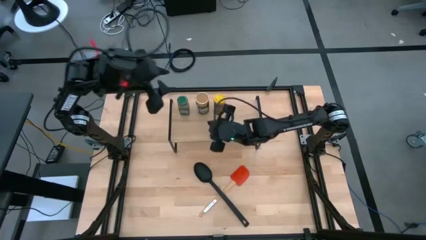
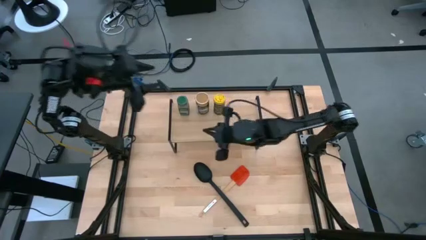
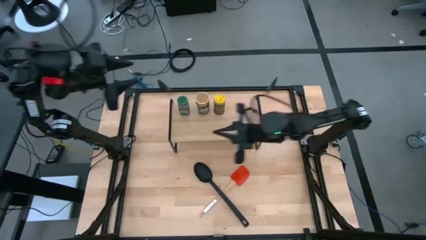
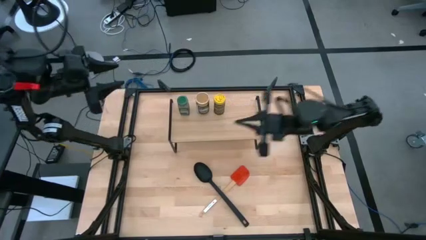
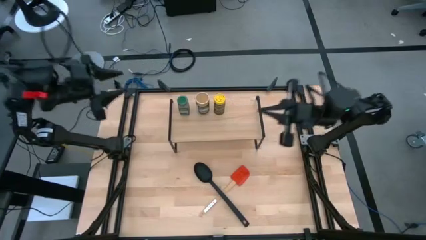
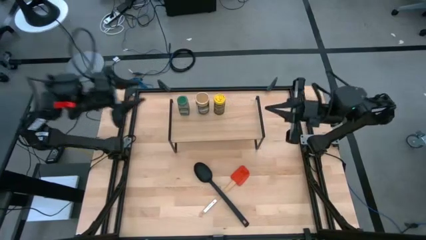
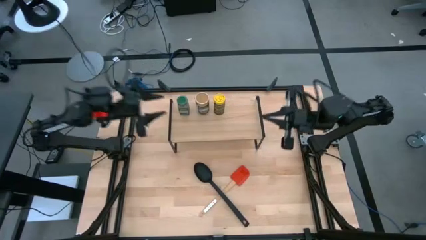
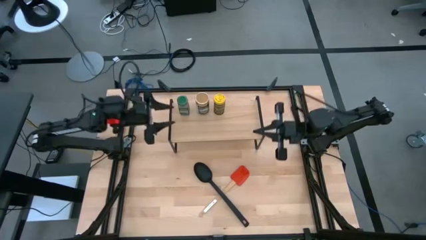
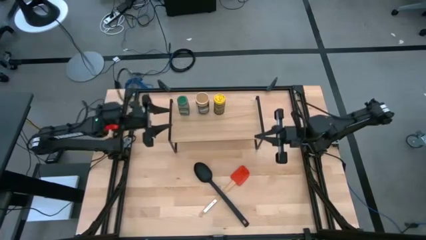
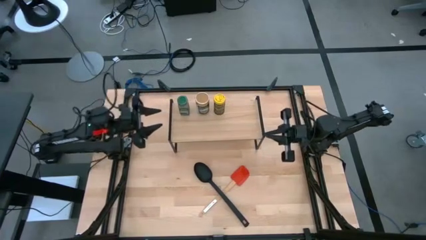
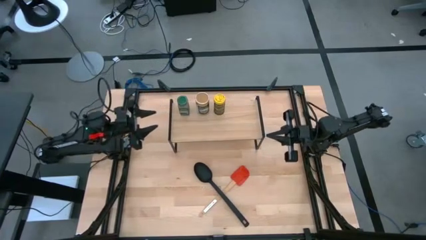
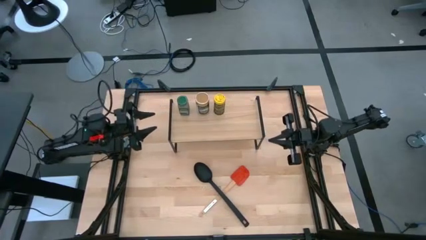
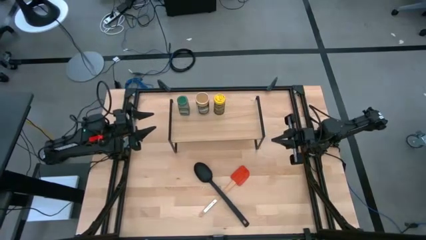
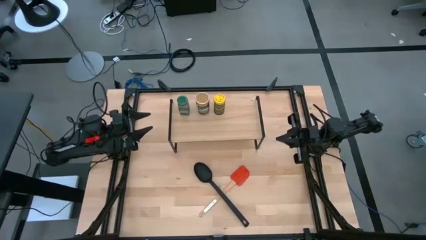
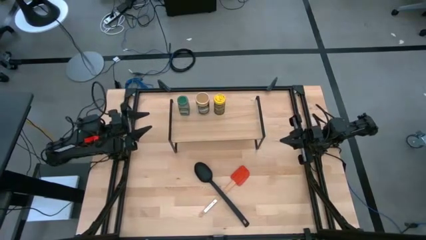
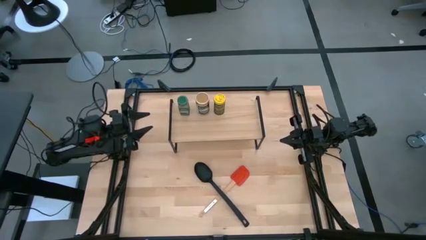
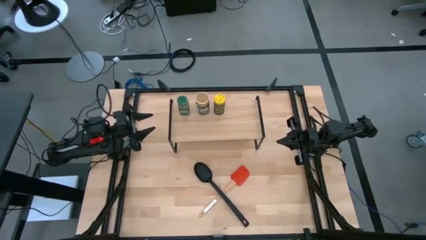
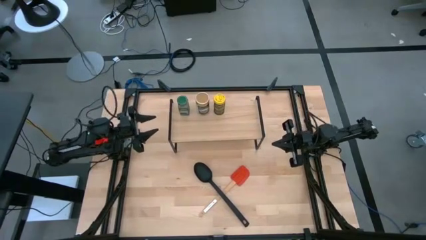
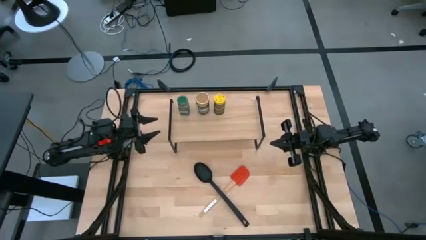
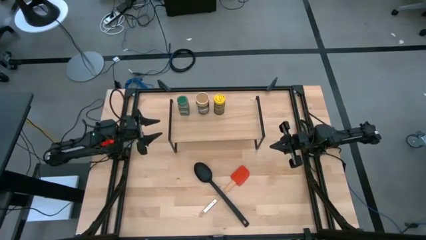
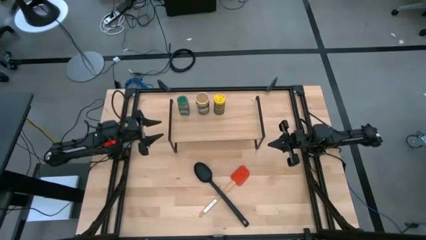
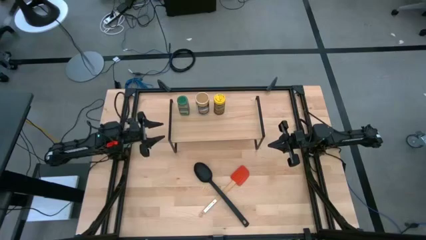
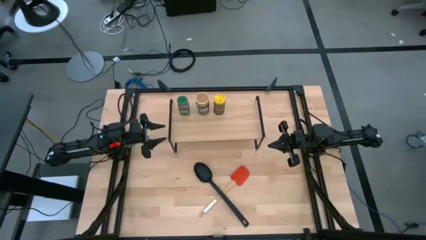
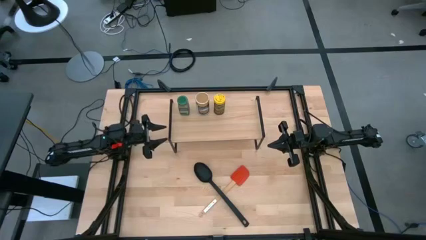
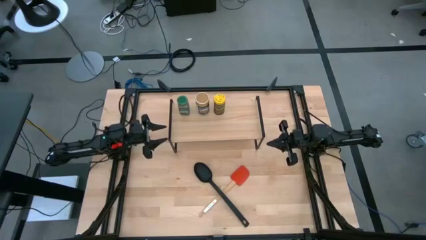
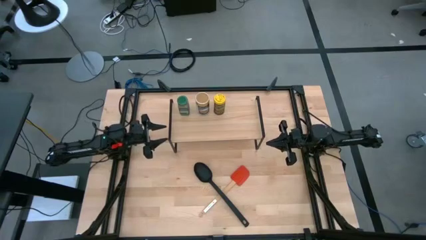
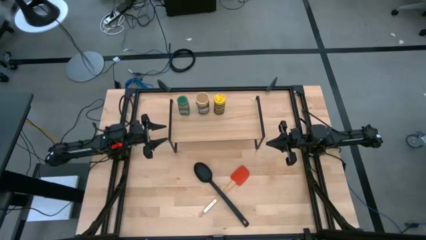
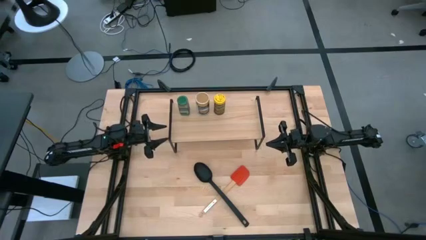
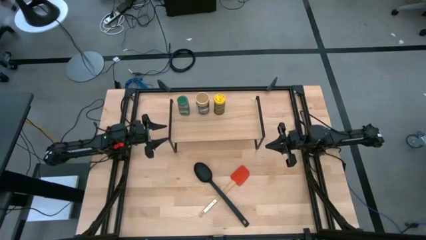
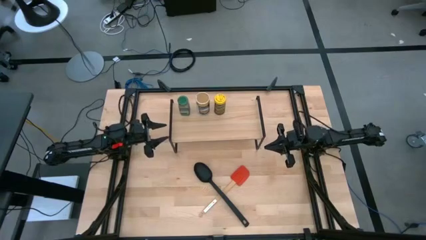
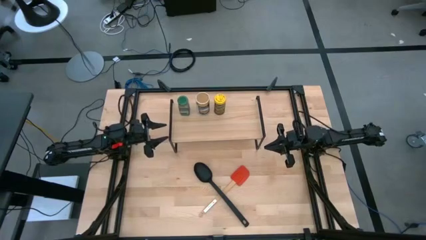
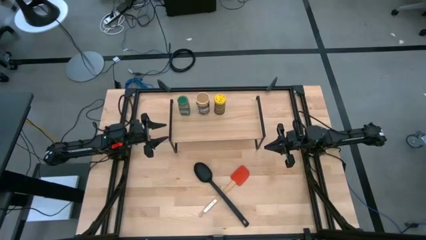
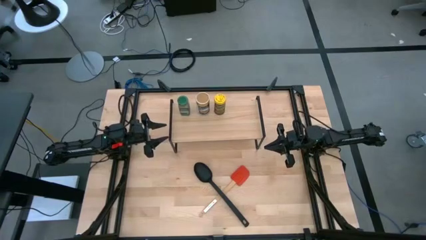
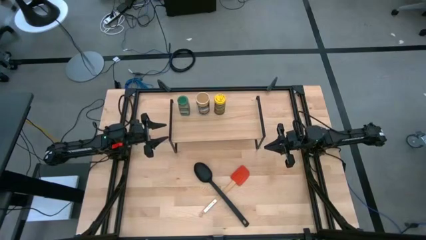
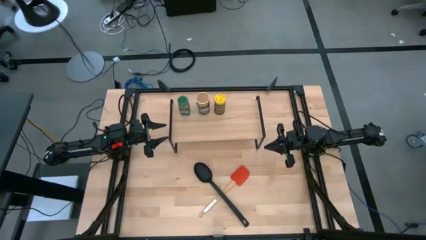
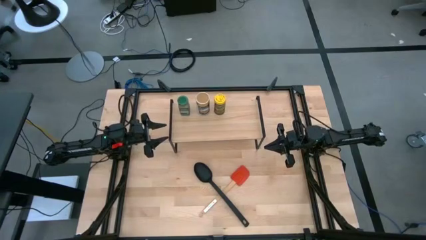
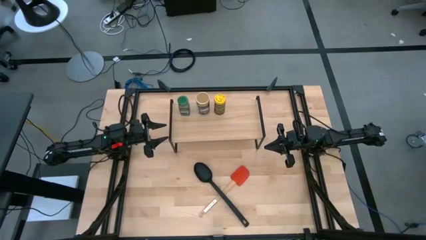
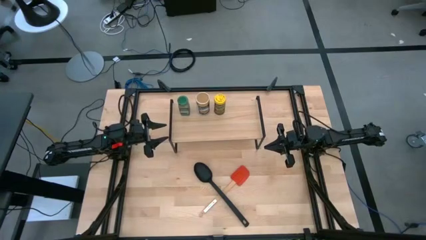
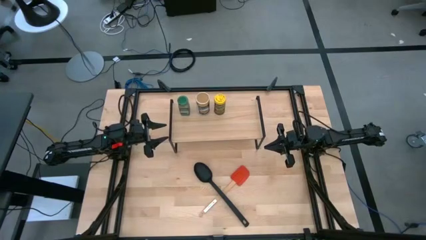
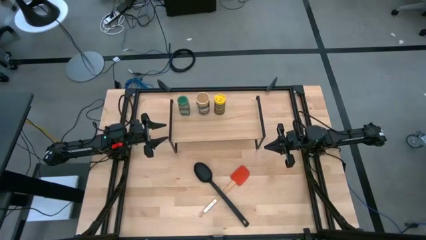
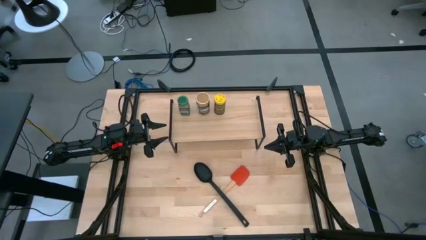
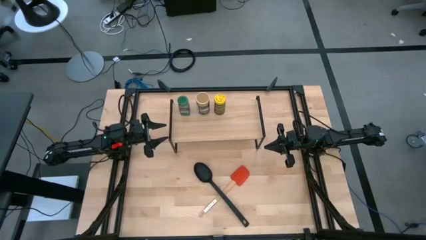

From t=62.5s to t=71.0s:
Task: Shelf spices
Return to Home Position
